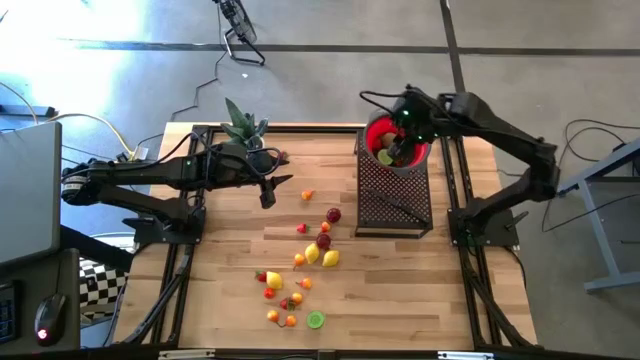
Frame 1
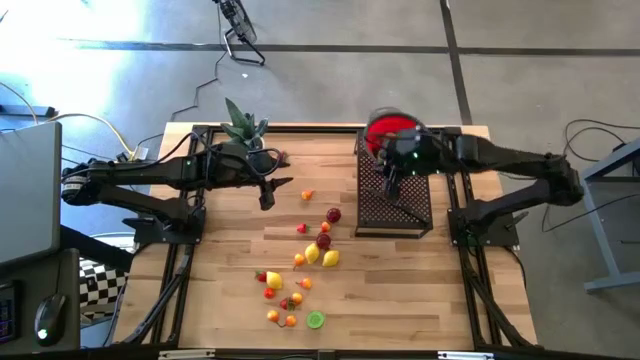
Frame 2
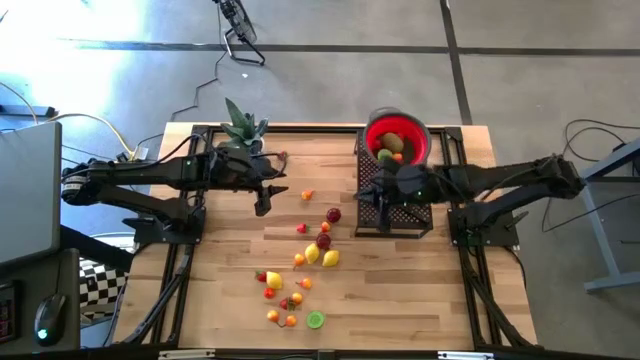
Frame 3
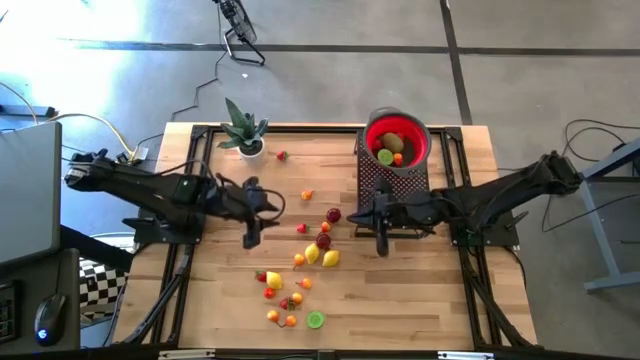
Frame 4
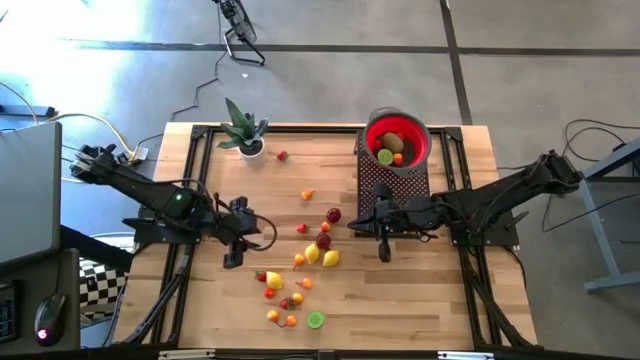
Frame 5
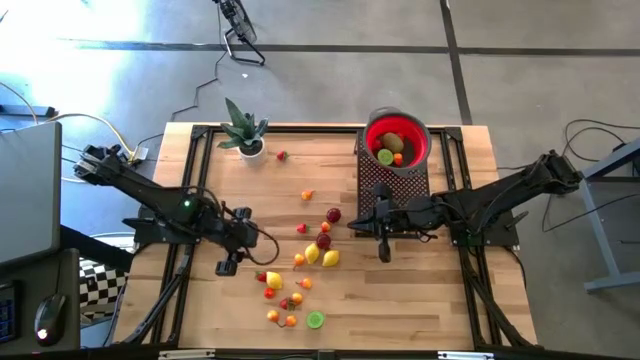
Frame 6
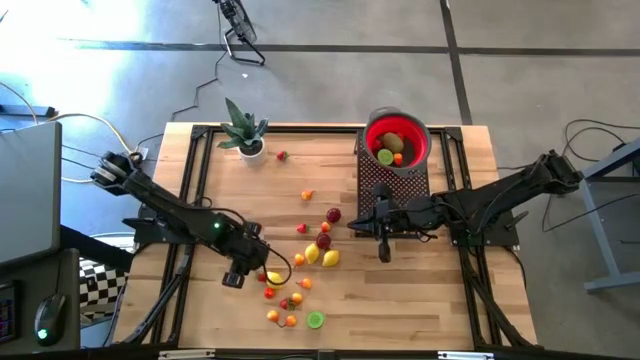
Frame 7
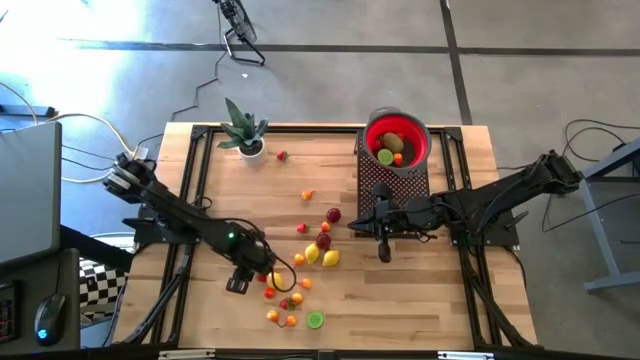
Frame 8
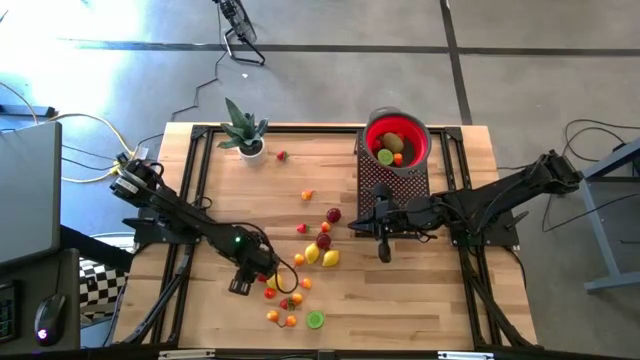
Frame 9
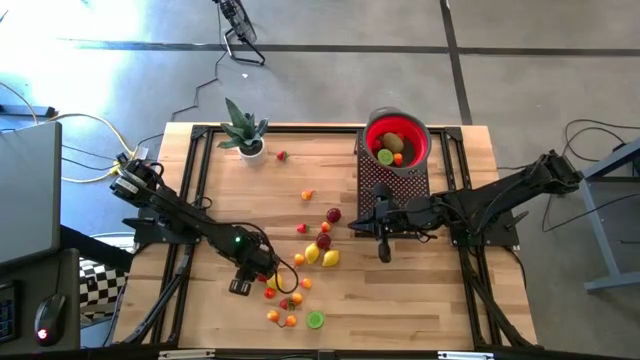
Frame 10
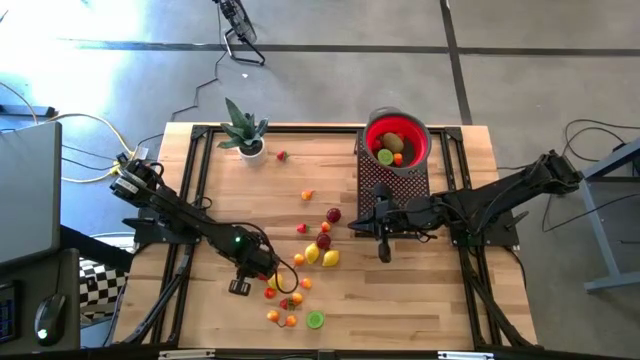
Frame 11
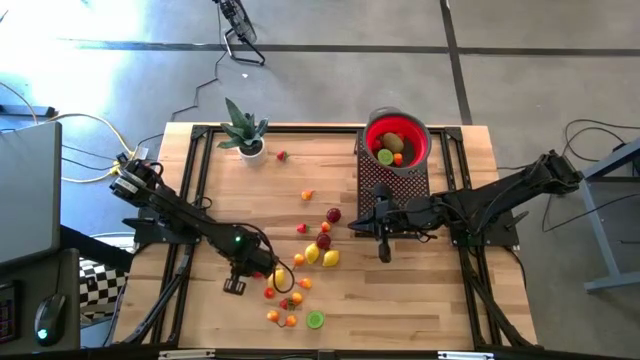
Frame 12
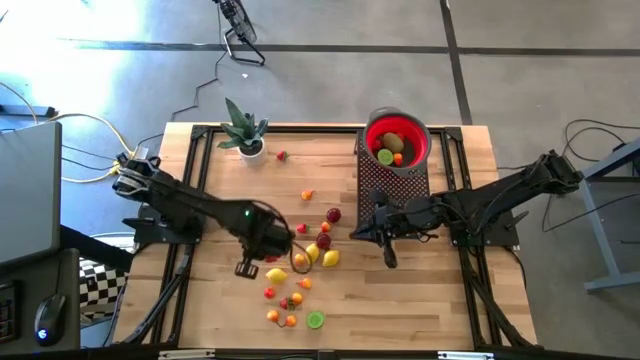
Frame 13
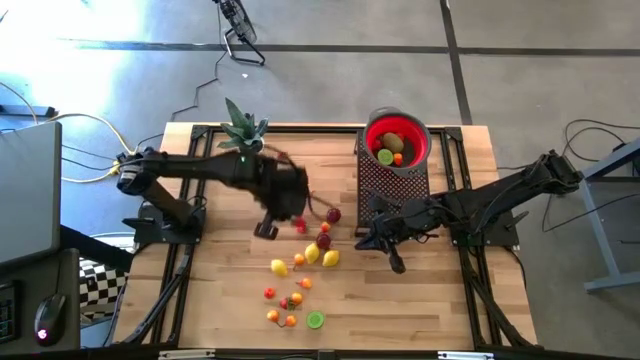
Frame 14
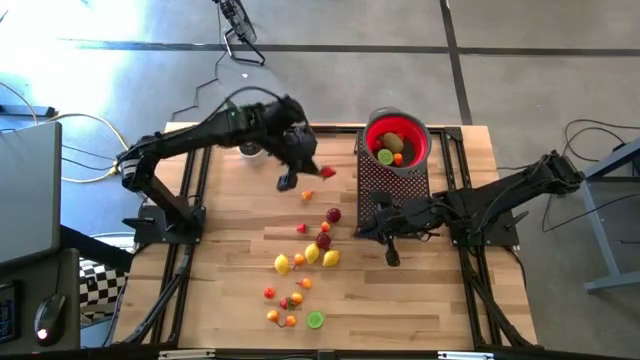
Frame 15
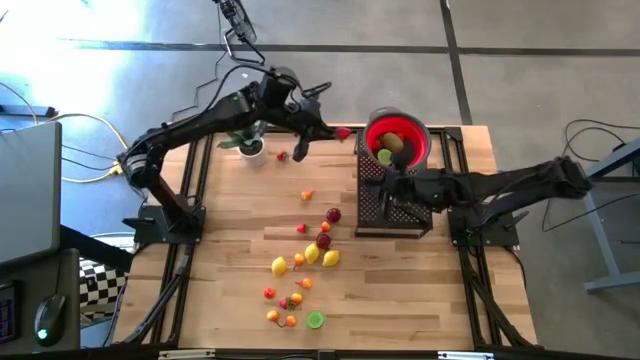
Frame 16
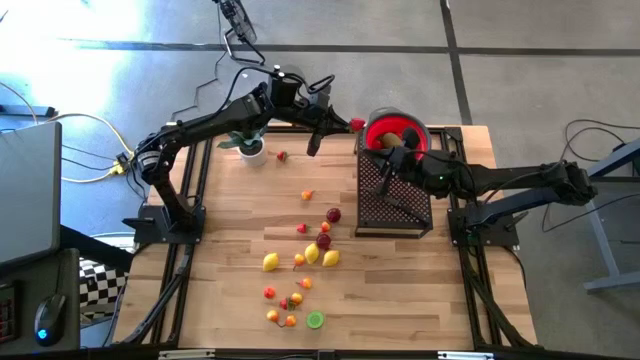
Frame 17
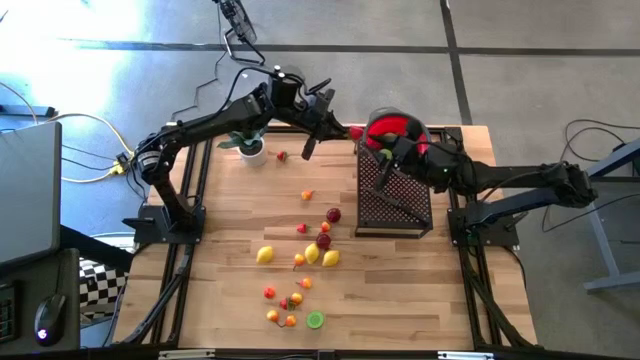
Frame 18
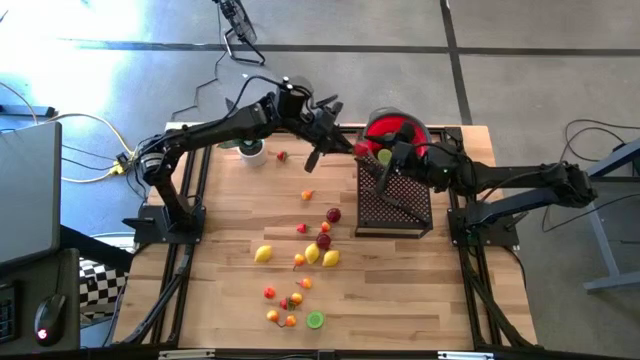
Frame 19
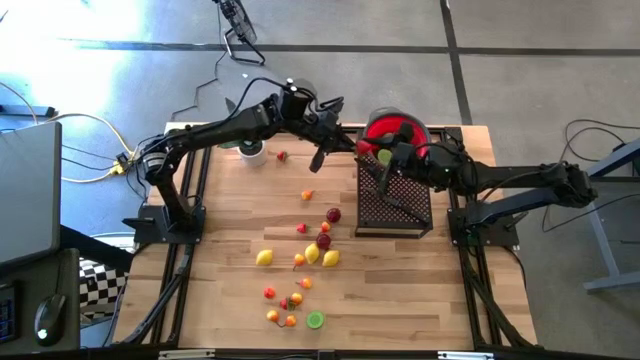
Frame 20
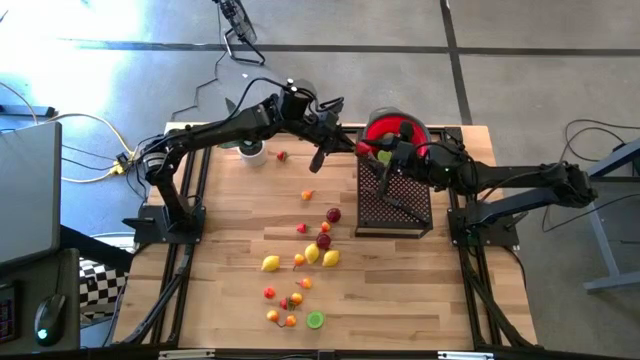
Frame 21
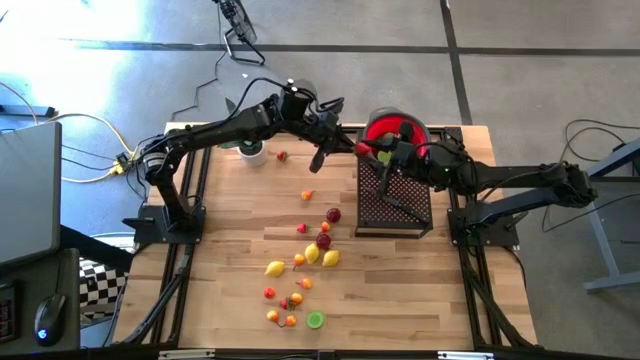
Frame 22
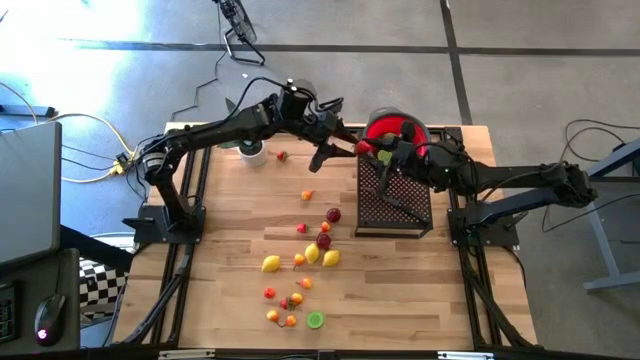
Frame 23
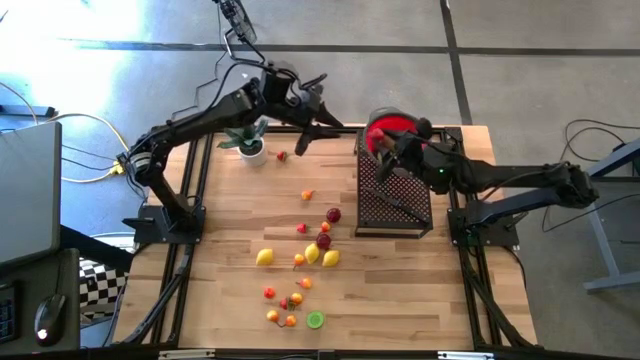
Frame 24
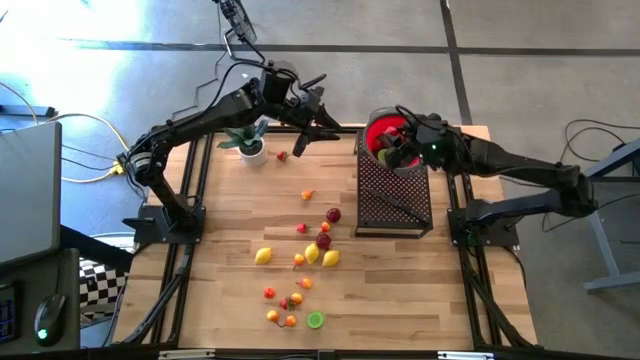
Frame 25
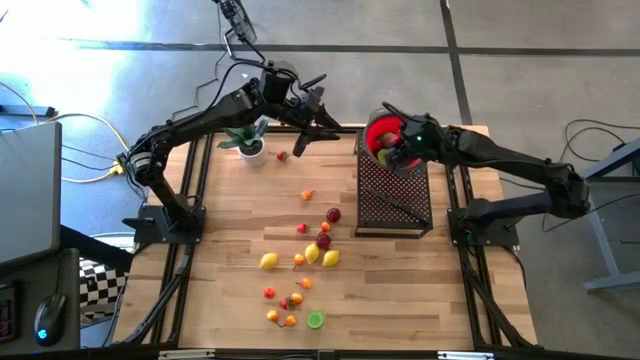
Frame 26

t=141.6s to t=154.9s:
Task: Pick & Place Fruit
Put the strawberry into the strainer bowl on the shelf

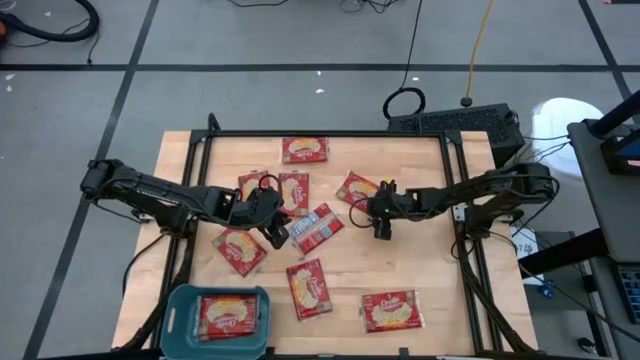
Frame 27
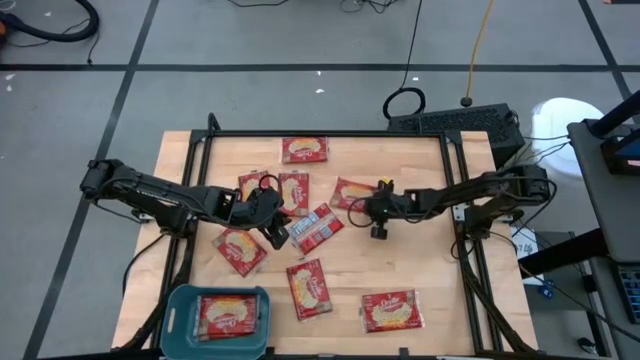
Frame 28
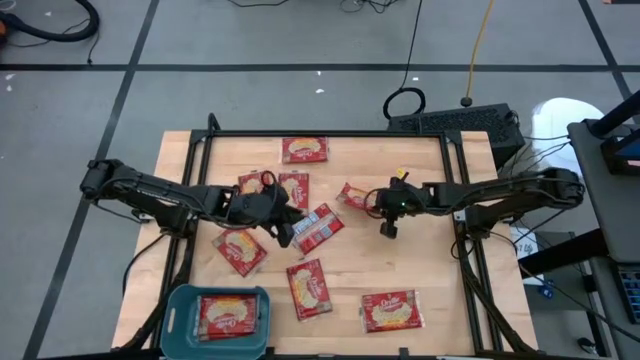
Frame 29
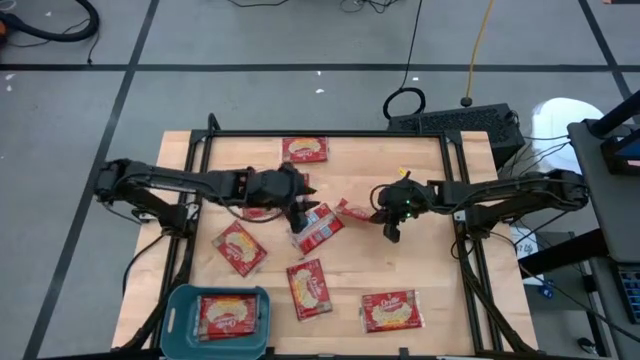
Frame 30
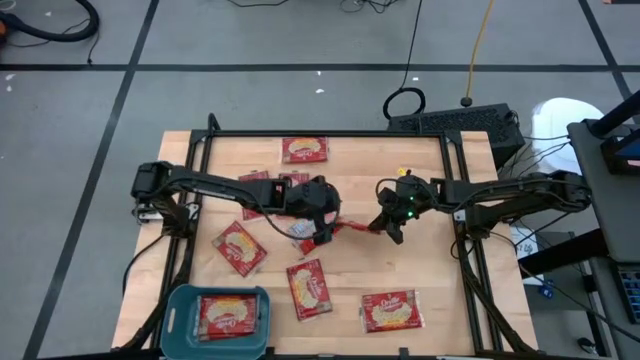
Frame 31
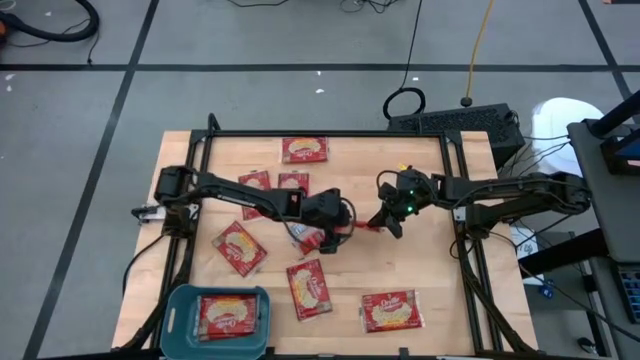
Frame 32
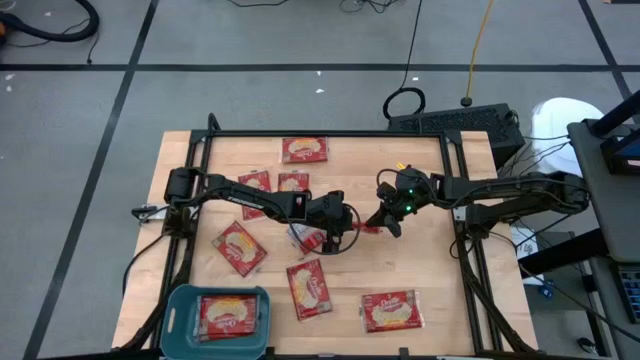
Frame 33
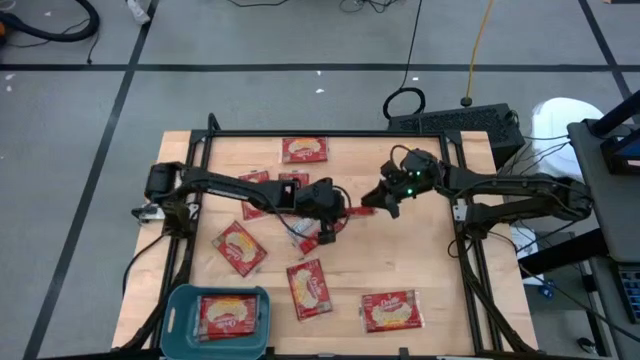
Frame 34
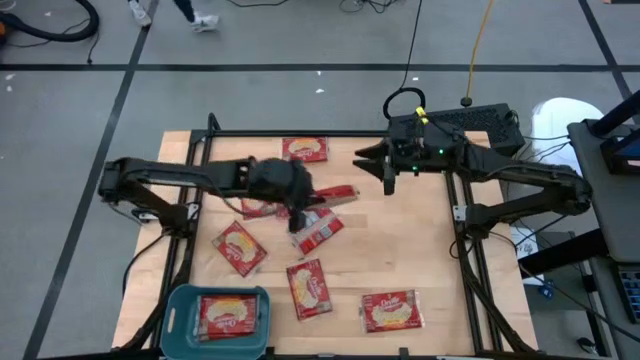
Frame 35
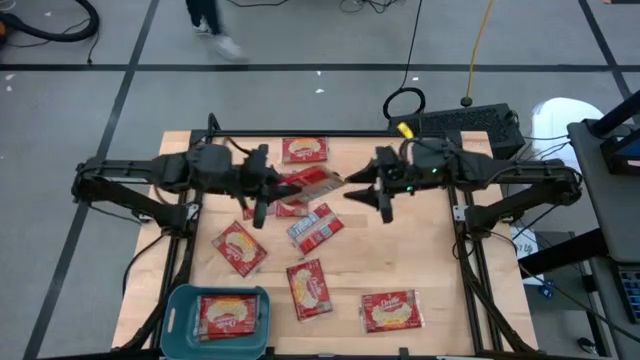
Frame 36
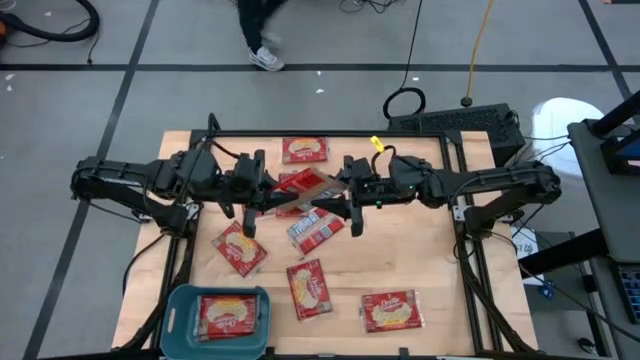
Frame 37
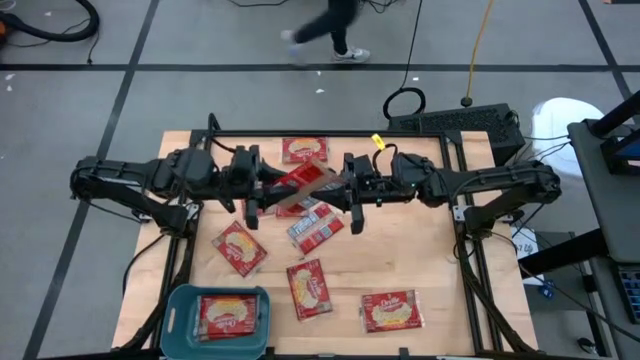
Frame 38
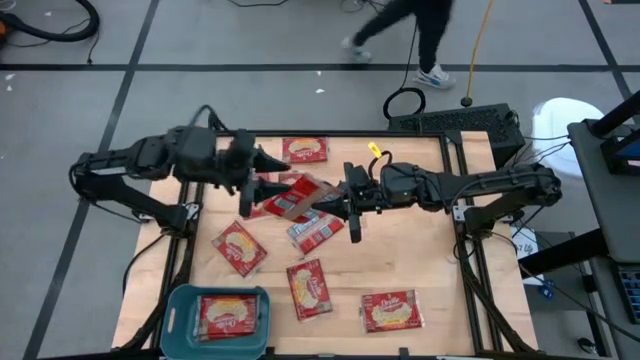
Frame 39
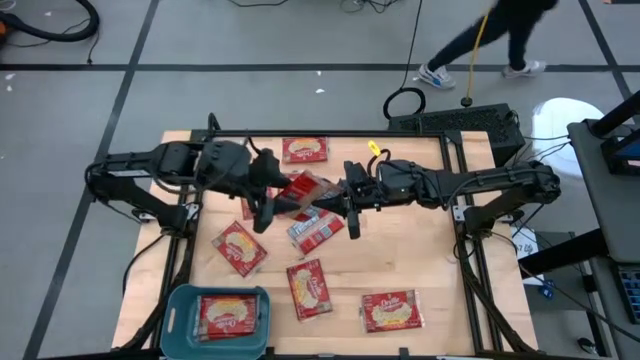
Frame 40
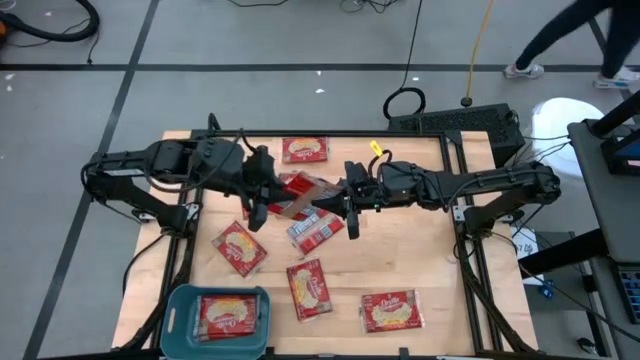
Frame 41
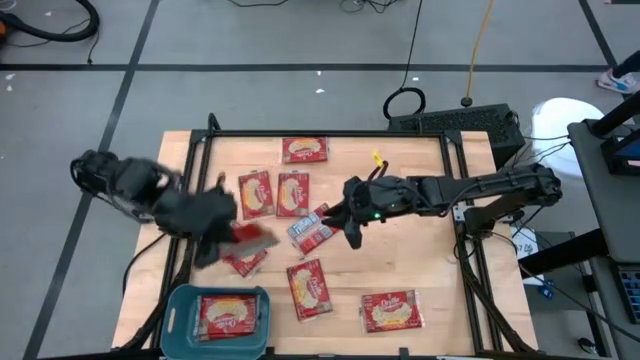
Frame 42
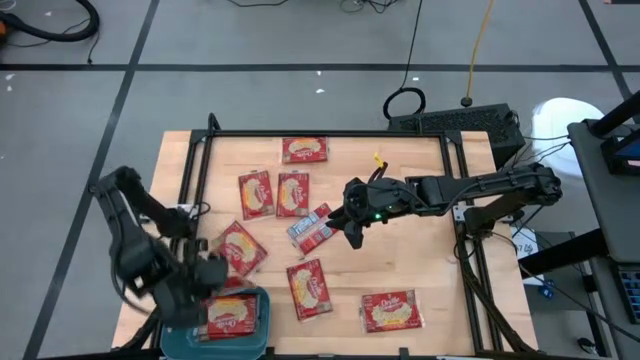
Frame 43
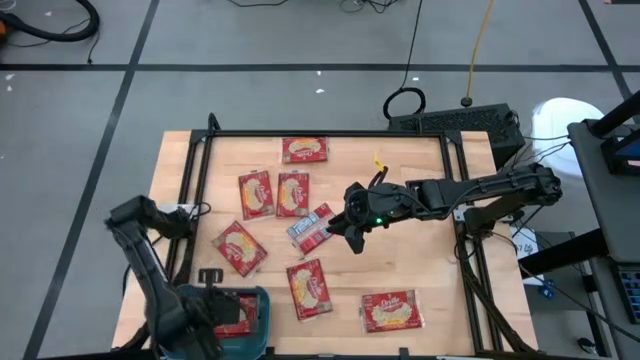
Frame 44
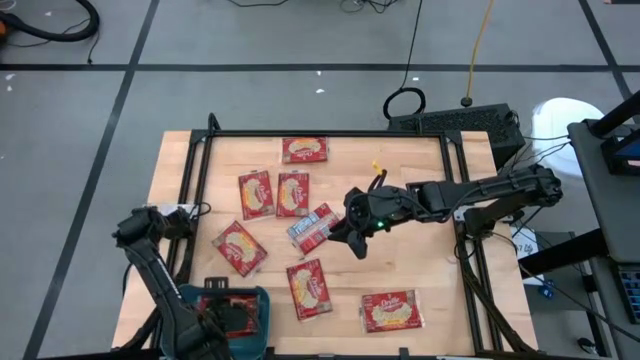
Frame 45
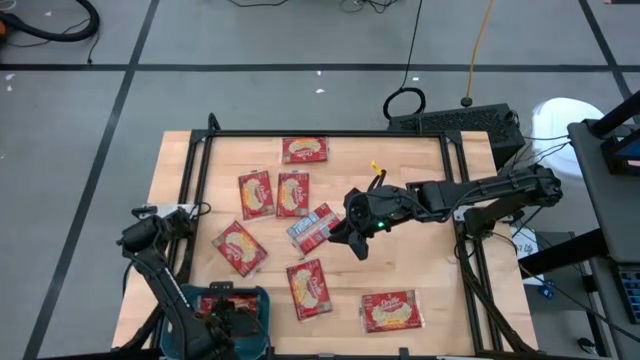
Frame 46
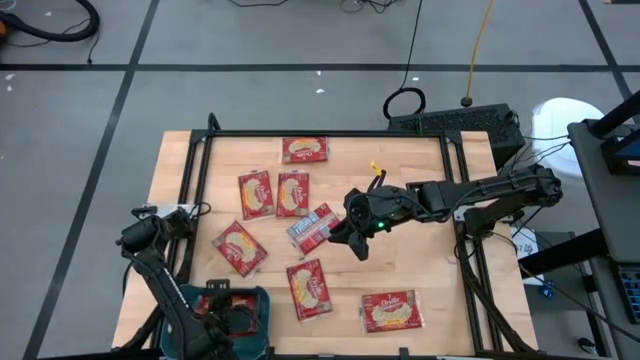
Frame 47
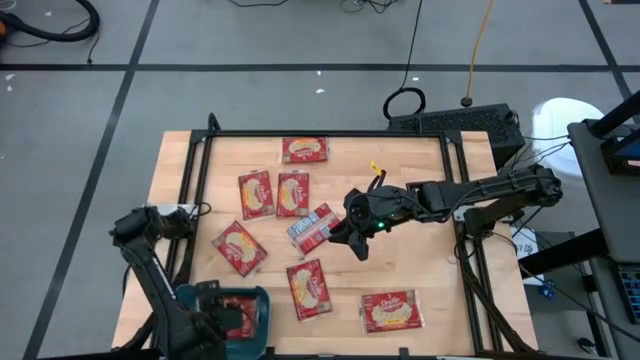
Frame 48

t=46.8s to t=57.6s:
Task: Sort popcorn bags into baskets
Put the popcorn sachet into the bin
